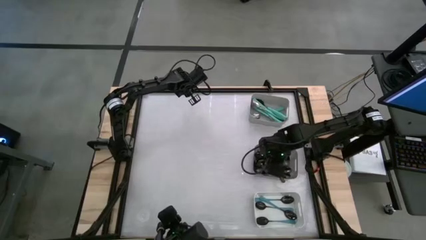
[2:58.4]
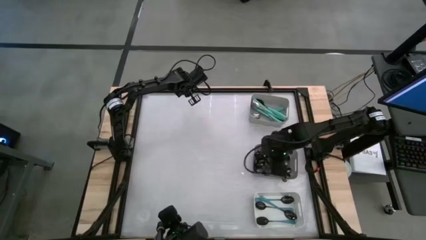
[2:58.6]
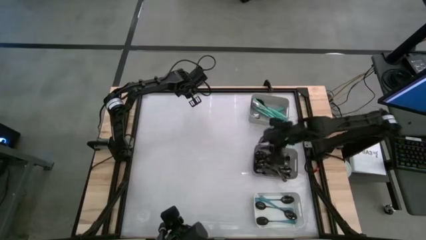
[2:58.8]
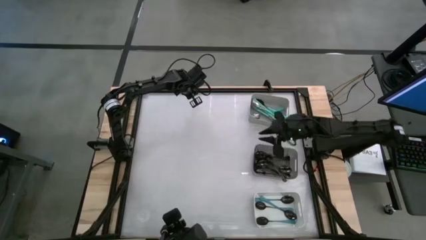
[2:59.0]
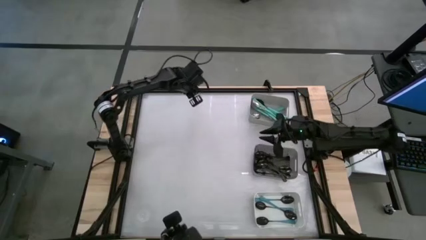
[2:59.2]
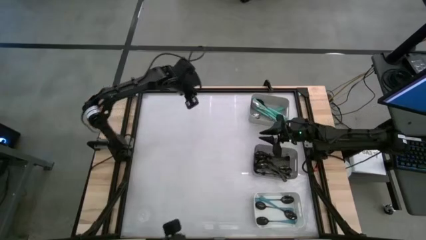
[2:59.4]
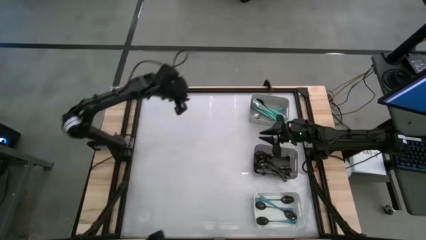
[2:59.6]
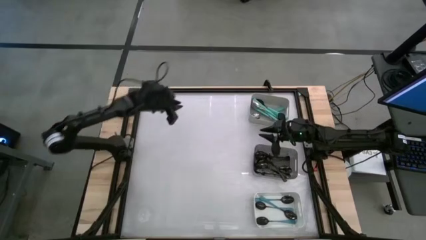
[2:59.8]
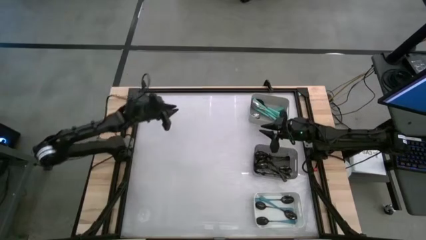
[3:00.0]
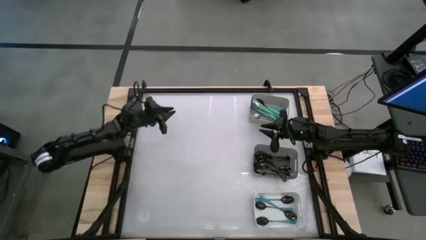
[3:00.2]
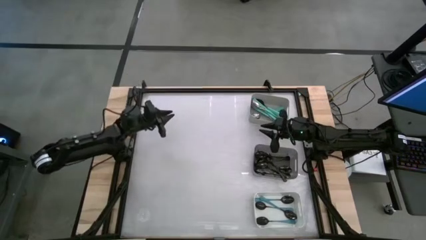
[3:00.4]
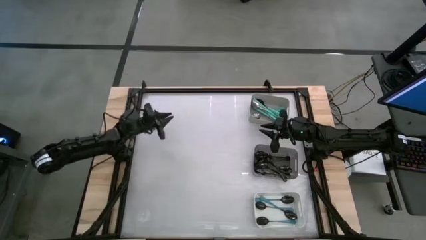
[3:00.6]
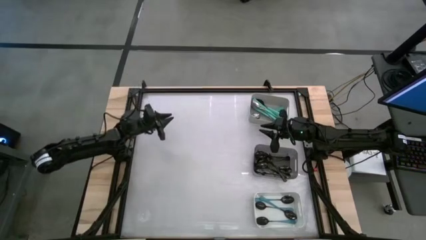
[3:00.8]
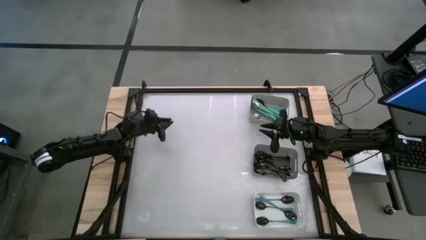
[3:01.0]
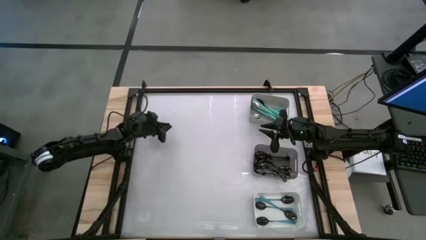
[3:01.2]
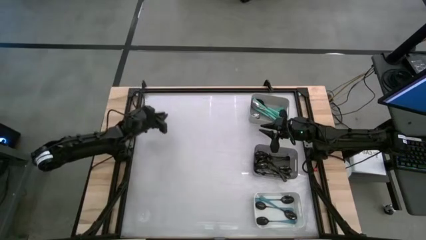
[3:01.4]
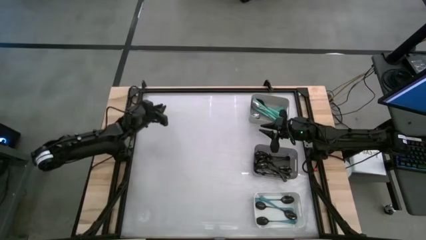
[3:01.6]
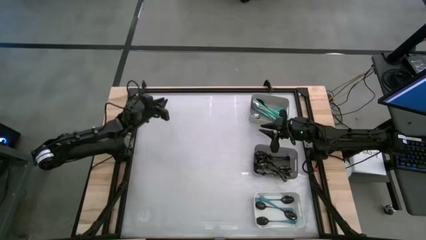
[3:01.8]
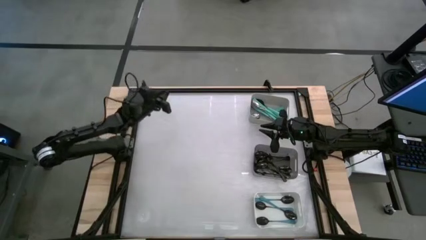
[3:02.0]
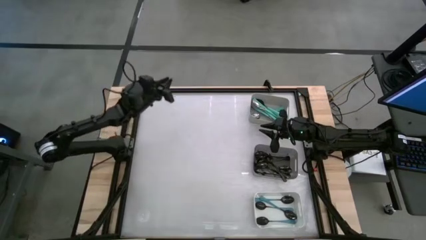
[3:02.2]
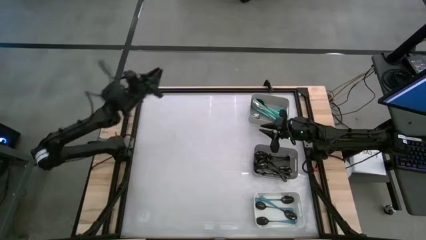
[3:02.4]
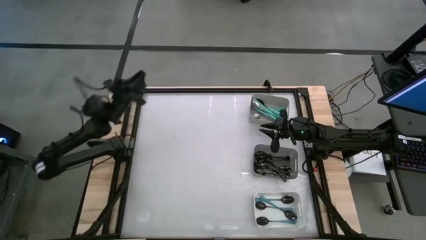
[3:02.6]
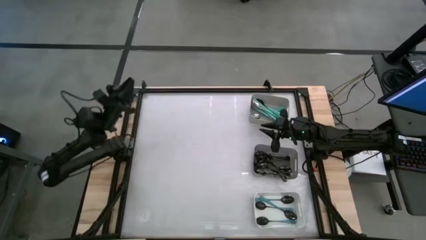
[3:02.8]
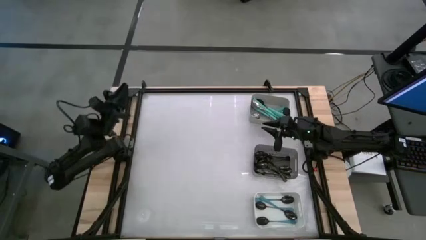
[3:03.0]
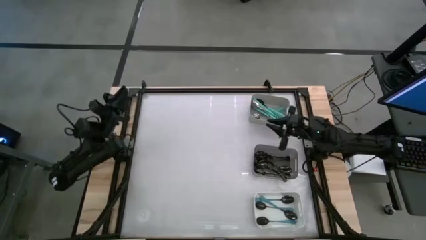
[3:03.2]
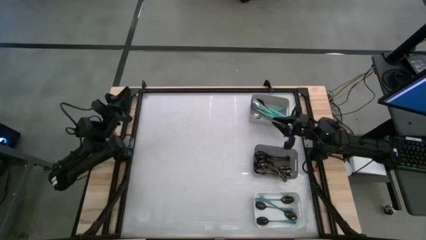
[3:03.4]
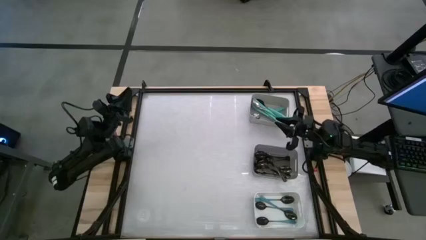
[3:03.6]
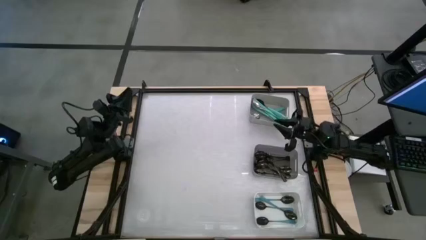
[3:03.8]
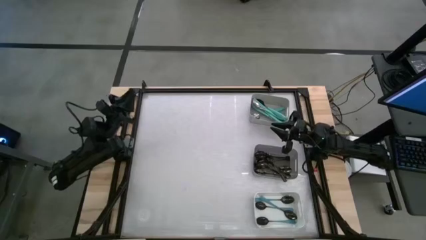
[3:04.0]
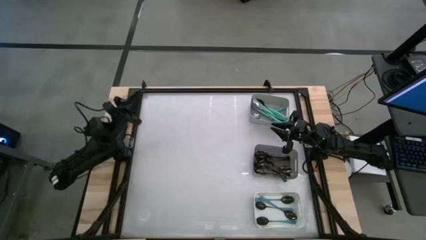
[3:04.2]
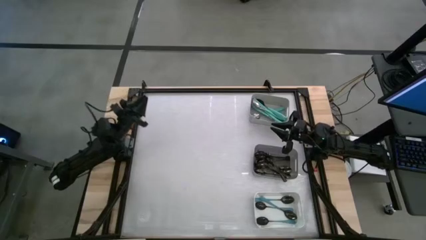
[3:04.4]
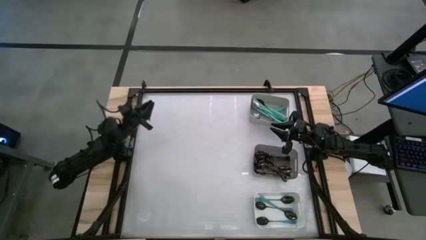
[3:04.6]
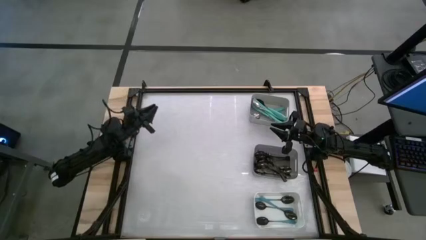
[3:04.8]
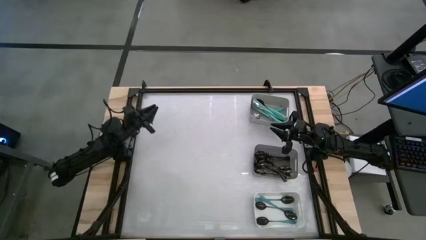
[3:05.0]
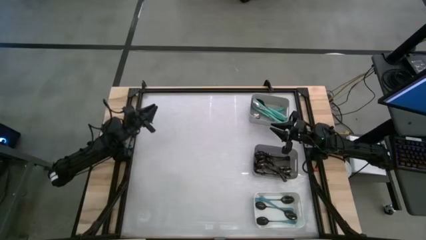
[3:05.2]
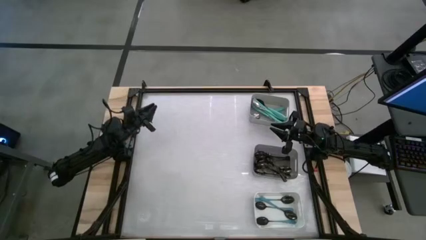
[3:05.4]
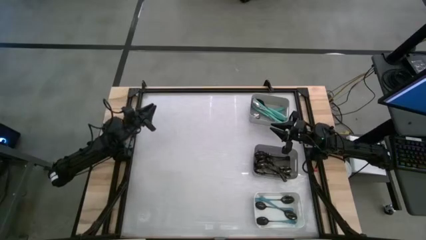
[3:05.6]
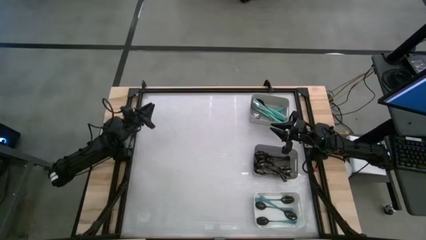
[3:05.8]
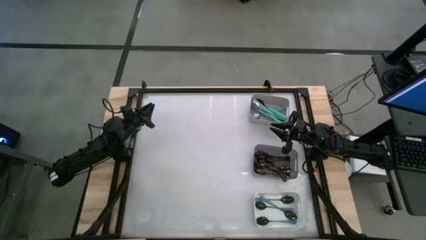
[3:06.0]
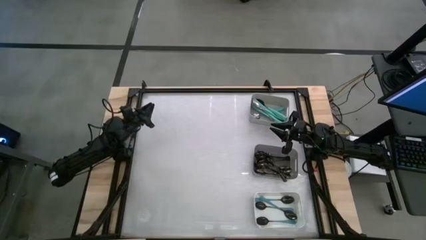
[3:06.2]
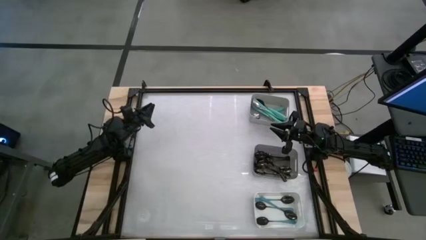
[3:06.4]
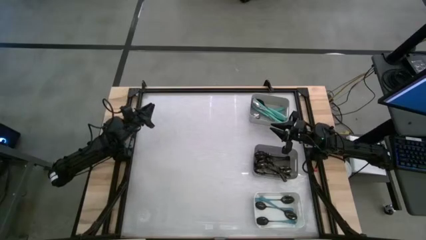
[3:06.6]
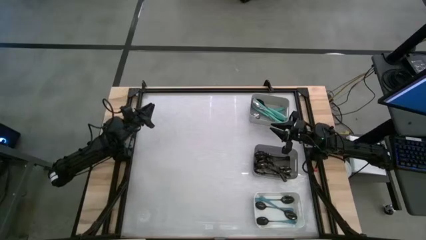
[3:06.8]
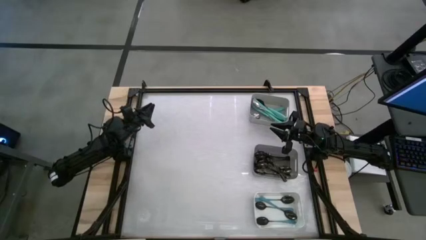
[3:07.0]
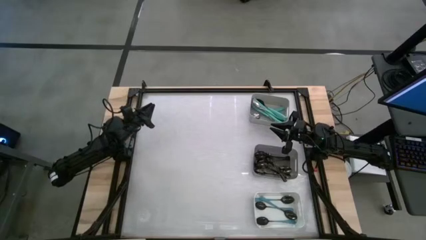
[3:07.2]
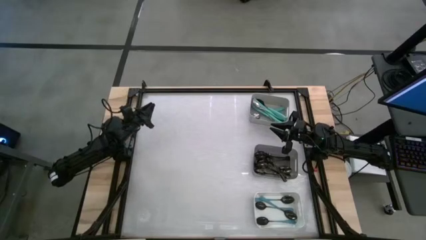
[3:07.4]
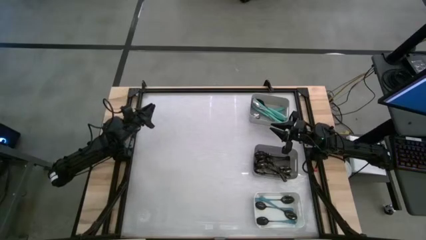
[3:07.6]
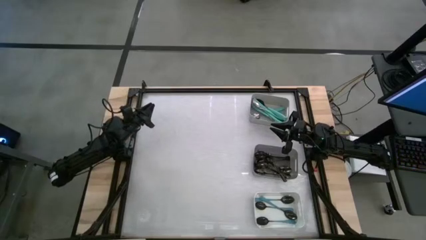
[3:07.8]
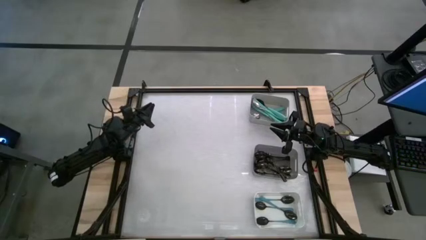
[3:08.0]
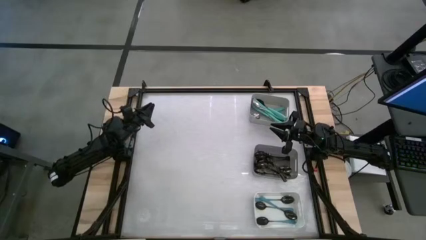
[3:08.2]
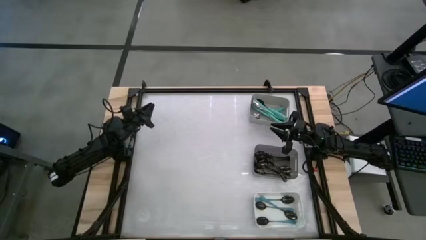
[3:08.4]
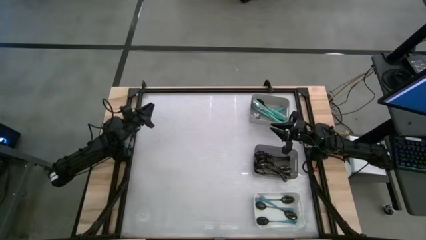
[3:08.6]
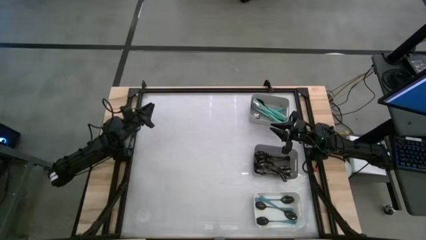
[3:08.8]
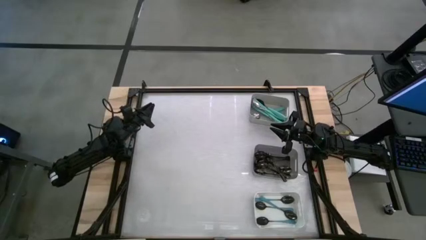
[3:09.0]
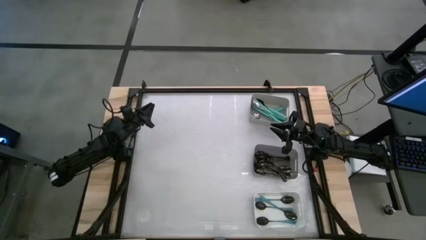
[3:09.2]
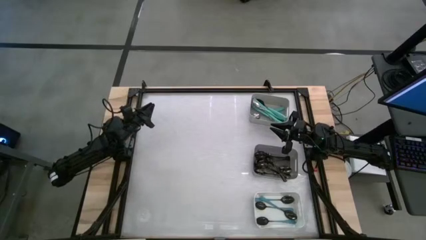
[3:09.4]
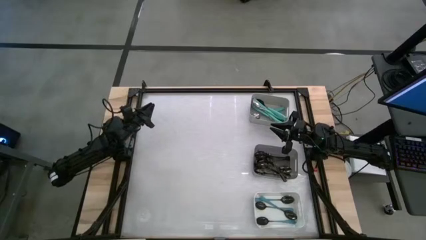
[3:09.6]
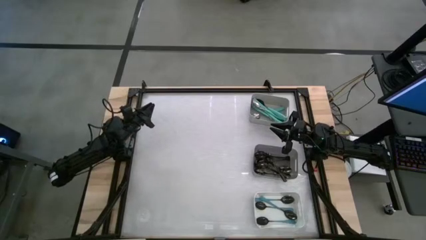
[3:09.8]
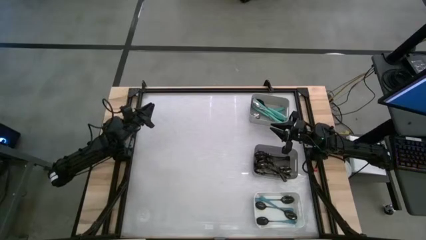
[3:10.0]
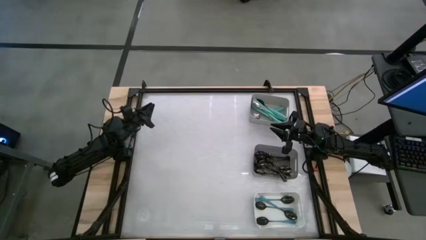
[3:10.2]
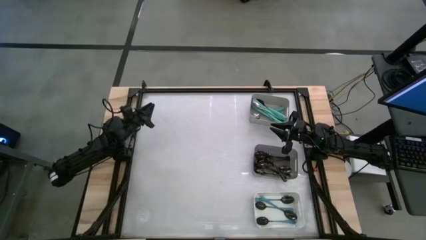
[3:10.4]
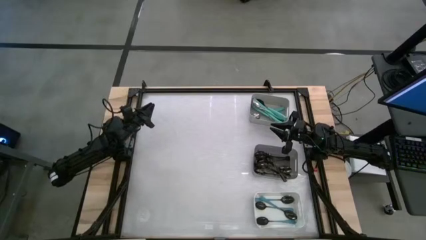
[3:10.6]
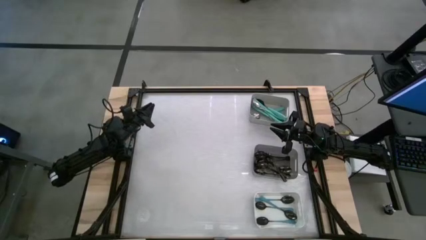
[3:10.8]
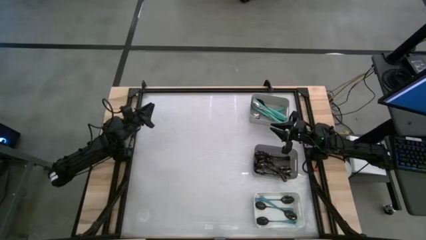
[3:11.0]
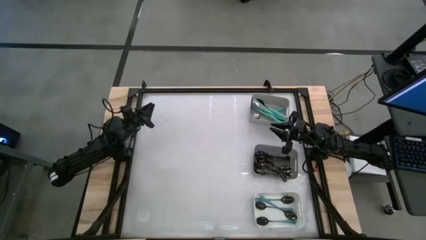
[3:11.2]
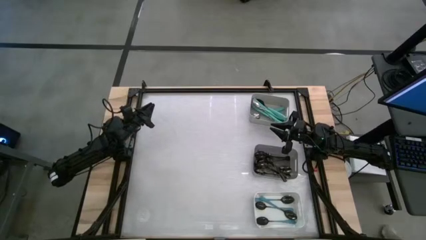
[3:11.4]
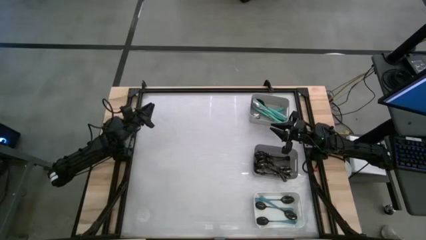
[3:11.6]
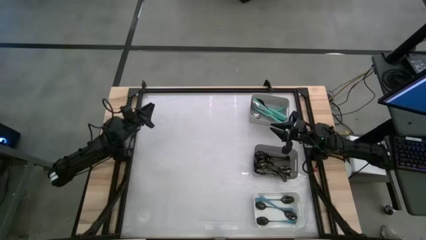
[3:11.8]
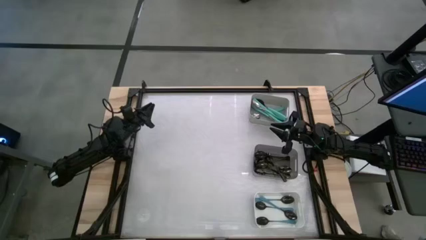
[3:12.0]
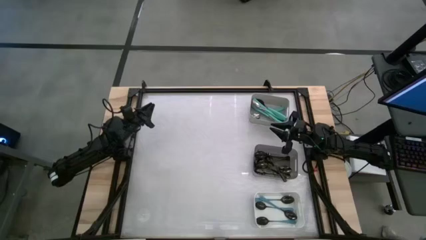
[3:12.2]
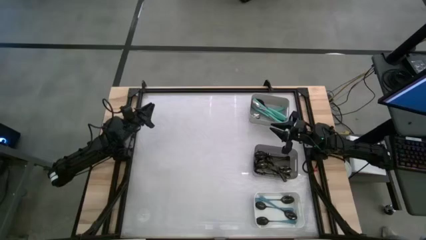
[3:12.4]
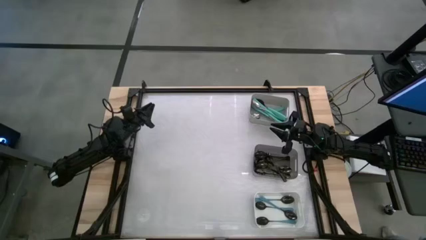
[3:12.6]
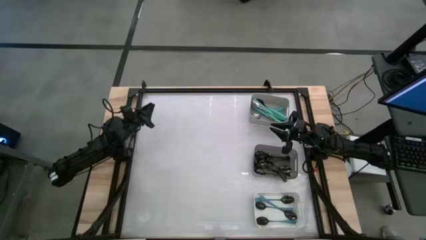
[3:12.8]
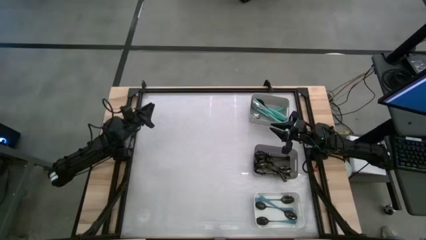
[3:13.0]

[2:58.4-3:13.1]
Task: Sort silverware by color (type)
Return to Home Position

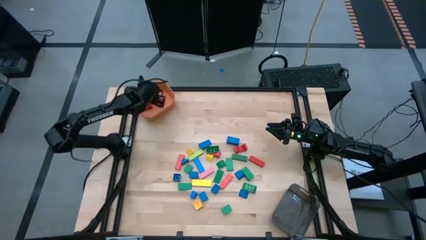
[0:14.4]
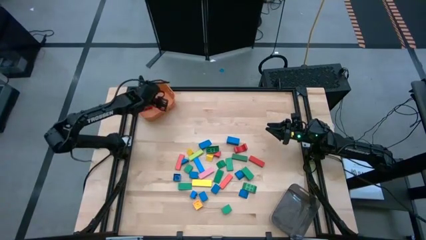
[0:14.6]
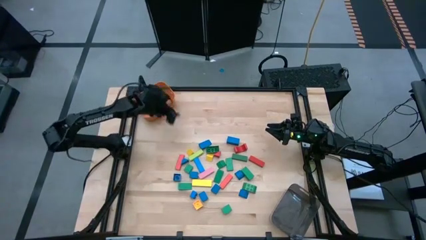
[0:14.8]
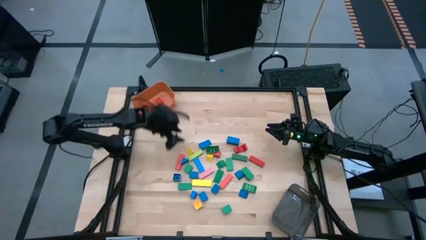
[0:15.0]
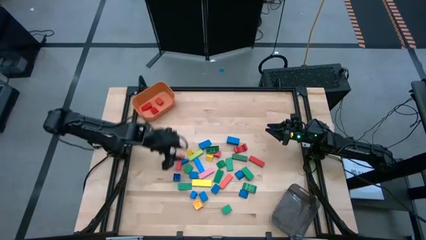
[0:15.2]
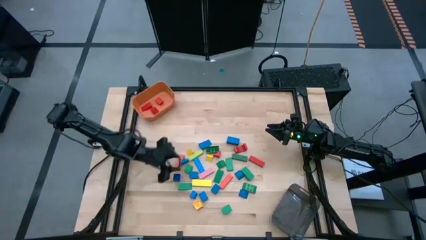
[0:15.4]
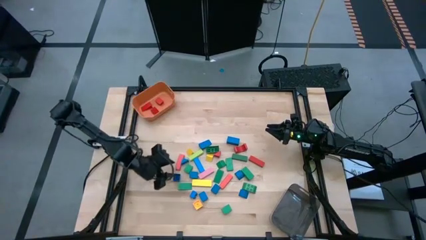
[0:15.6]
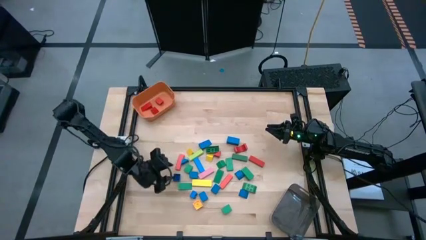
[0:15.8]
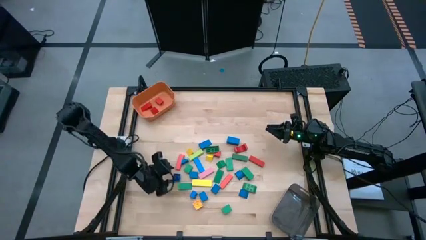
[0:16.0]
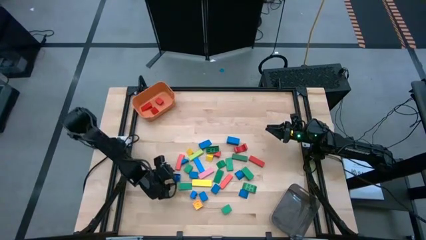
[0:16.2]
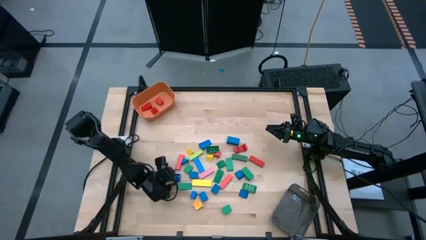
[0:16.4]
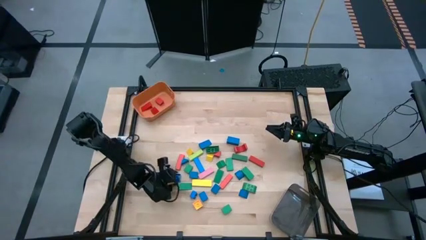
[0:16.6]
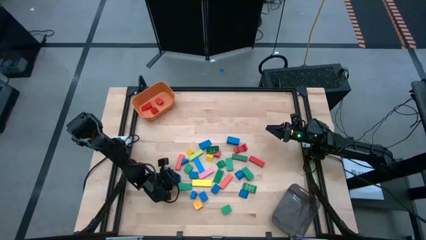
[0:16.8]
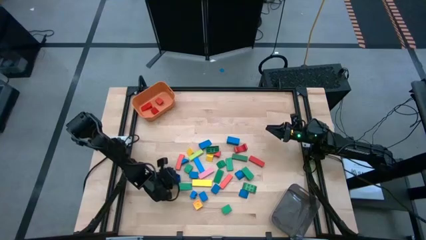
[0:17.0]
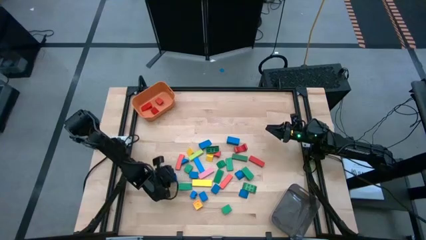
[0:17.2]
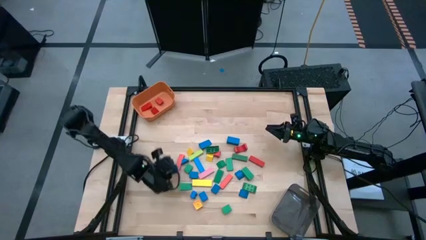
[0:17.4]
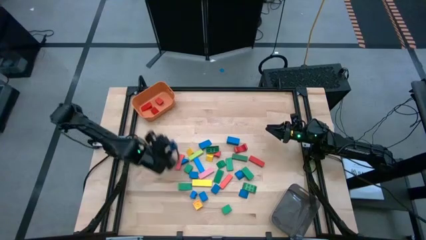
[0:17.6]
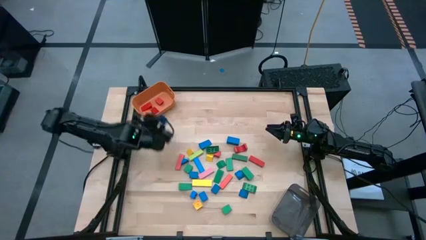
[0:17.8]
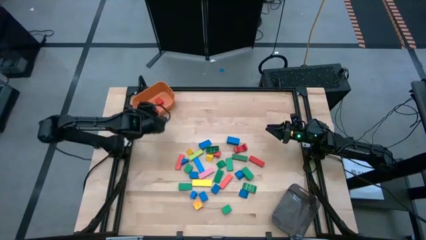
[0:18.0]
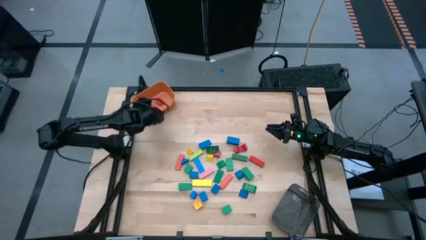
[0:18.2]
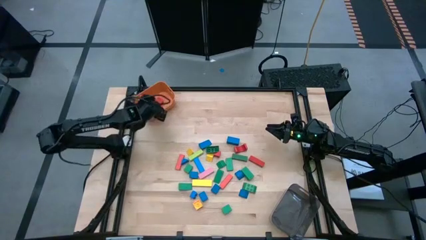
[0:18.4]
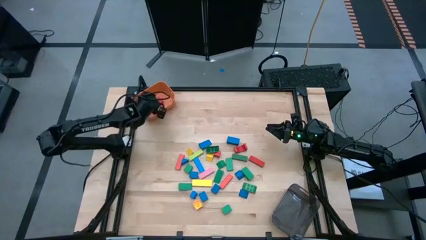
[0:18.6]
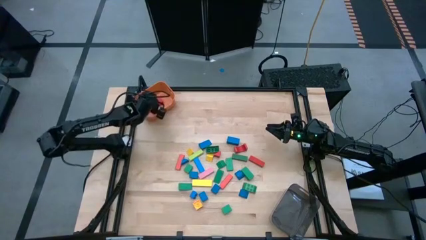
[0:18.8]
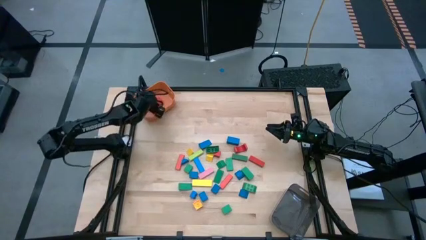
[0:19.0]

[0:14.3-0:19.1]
Task: Sort blocks by size
Put the small blue game piece into the orange bin
